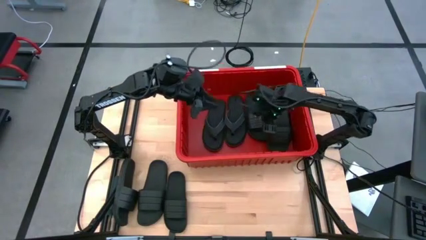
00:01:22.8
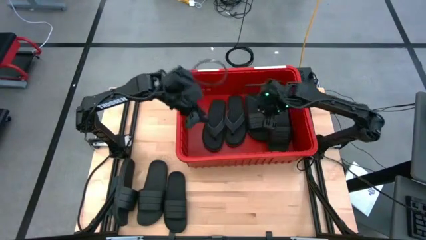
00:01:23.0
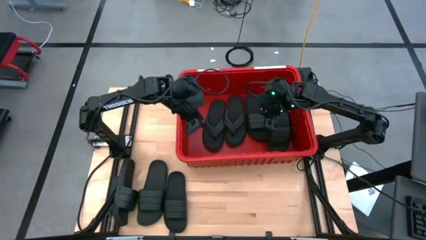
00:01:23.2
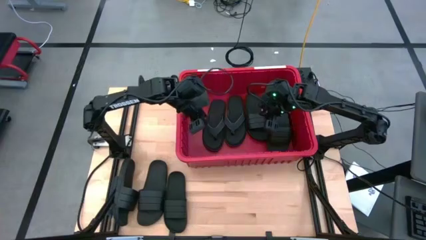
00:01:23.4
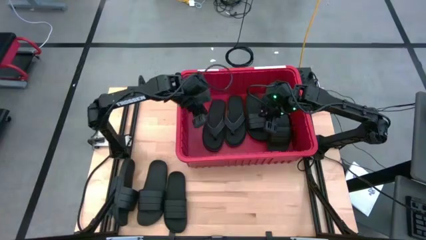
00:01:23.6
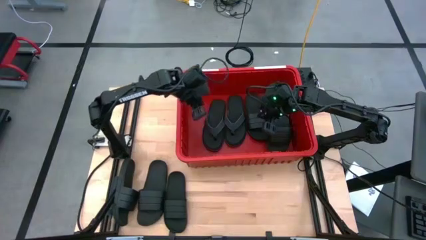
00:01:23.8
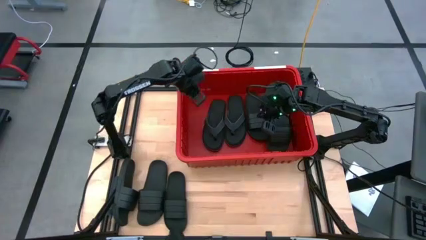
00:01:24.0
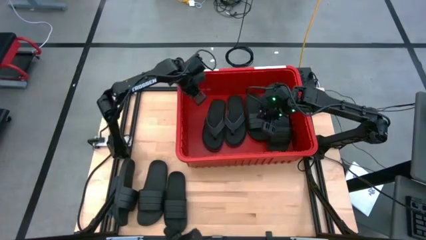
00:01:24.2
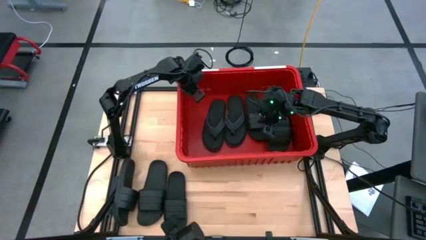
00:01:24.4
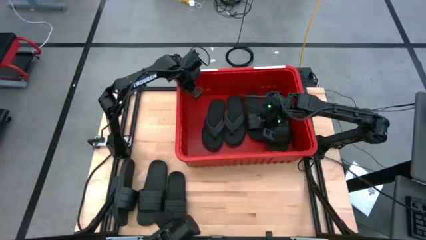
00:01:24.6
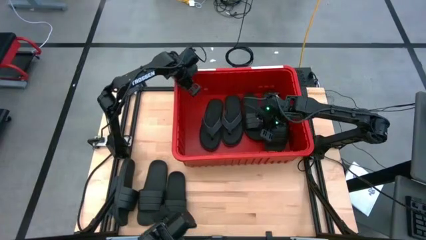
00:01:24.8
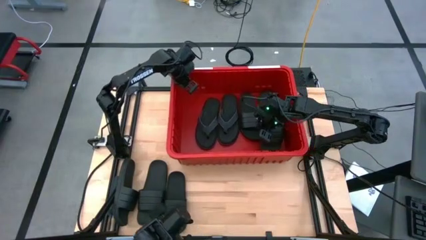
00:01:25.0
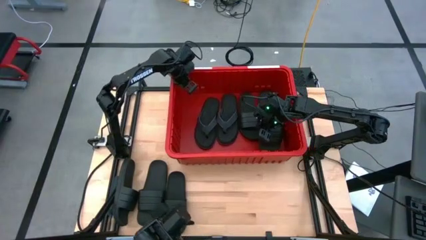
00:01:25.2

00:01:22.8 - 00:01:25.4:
Task: Pick and place slides into bin
Adjust the red bin

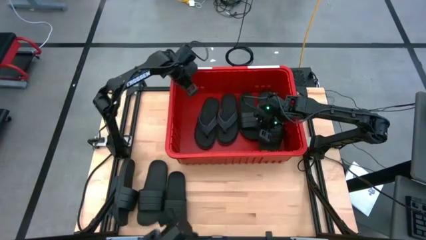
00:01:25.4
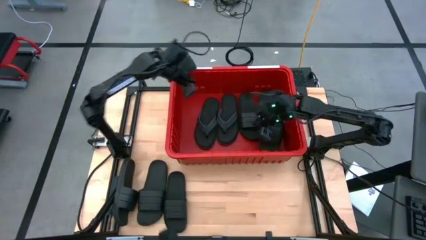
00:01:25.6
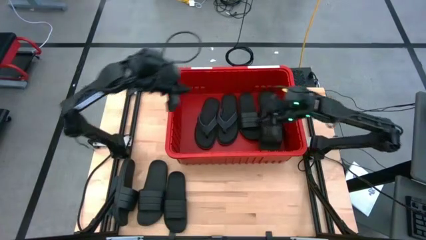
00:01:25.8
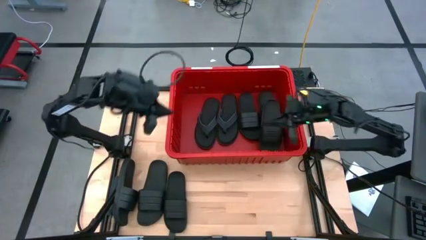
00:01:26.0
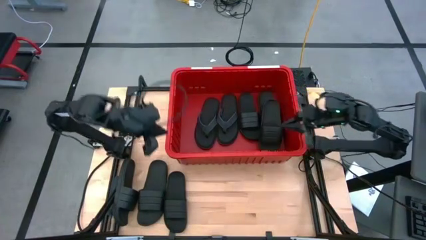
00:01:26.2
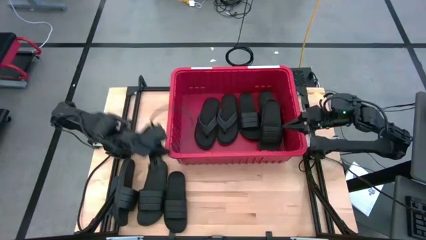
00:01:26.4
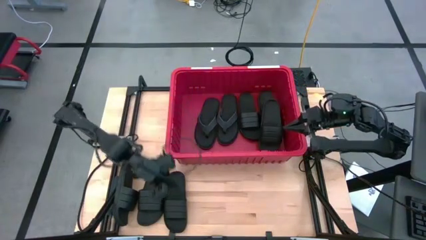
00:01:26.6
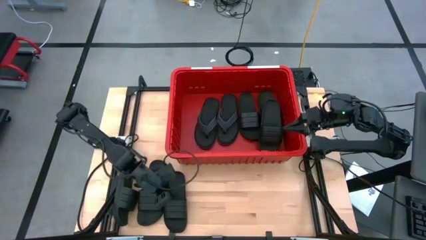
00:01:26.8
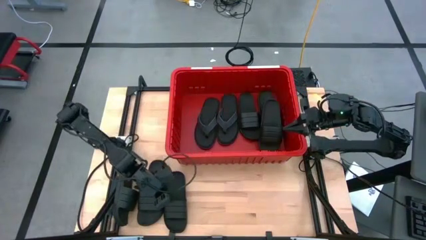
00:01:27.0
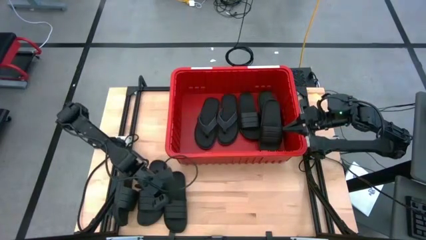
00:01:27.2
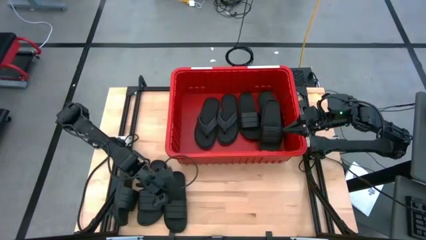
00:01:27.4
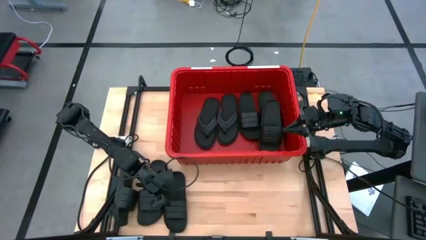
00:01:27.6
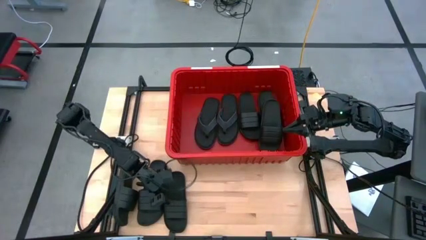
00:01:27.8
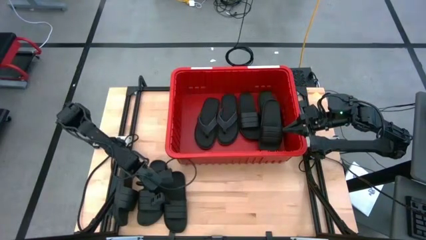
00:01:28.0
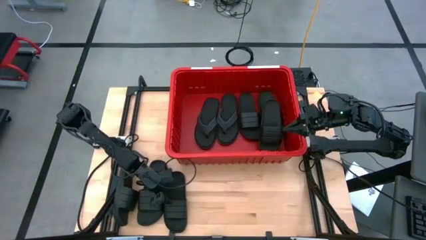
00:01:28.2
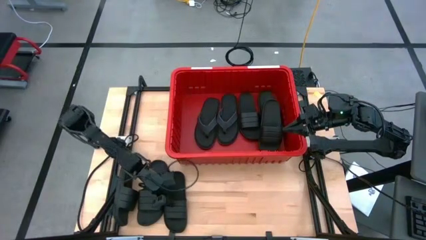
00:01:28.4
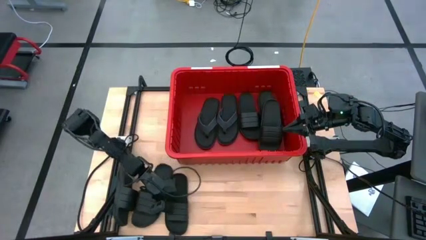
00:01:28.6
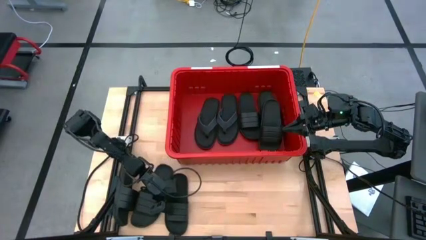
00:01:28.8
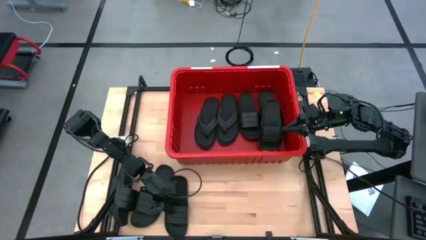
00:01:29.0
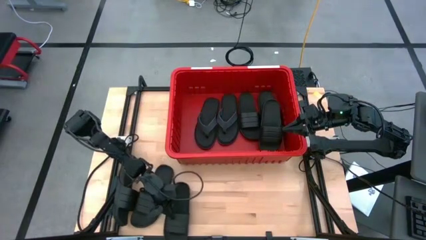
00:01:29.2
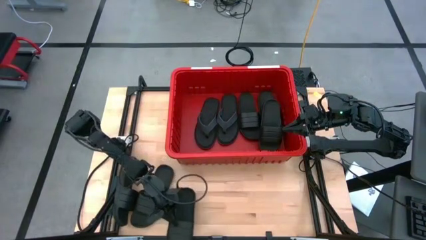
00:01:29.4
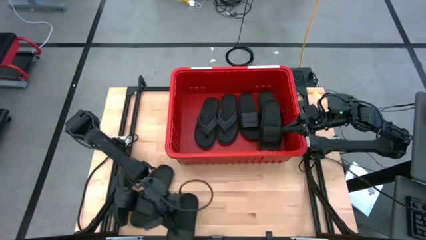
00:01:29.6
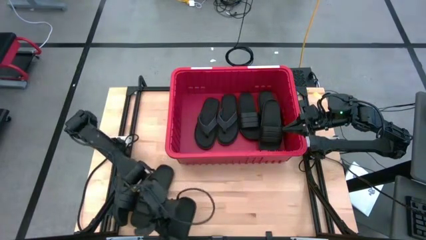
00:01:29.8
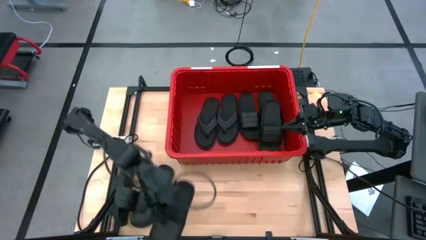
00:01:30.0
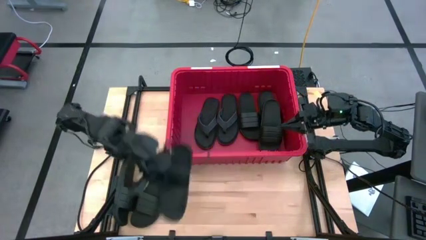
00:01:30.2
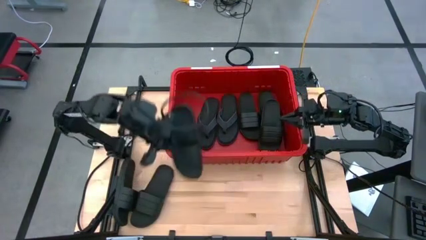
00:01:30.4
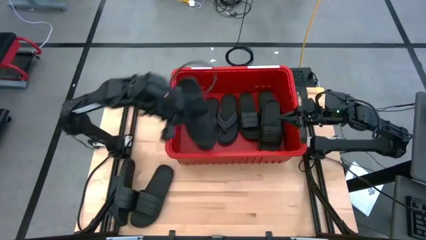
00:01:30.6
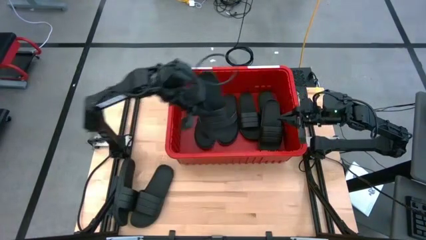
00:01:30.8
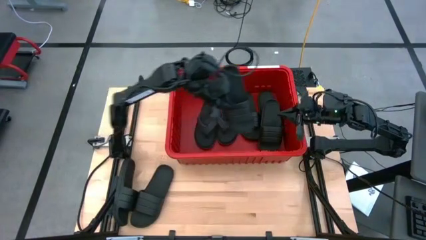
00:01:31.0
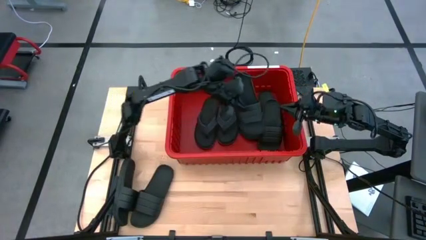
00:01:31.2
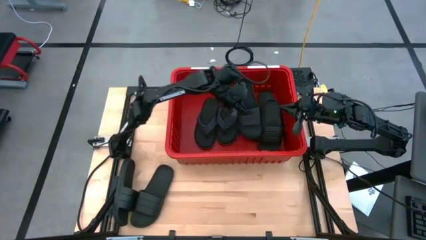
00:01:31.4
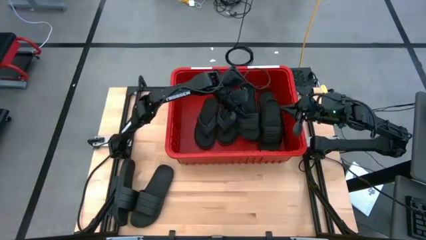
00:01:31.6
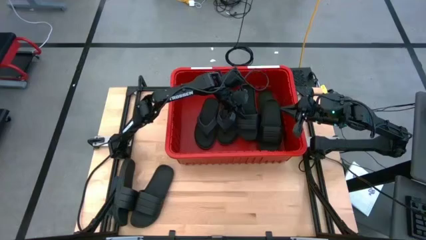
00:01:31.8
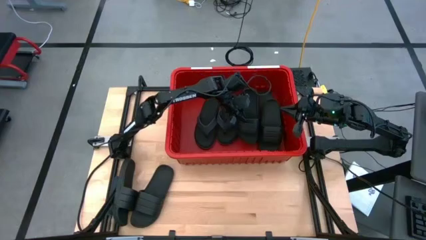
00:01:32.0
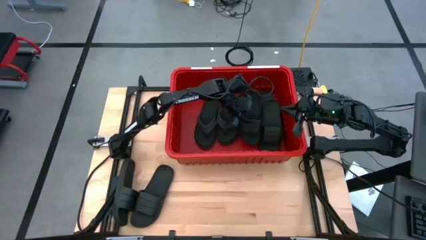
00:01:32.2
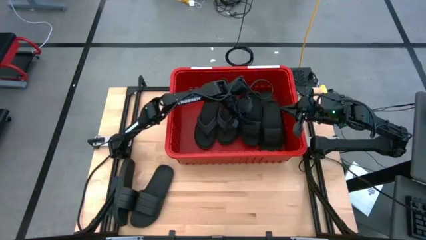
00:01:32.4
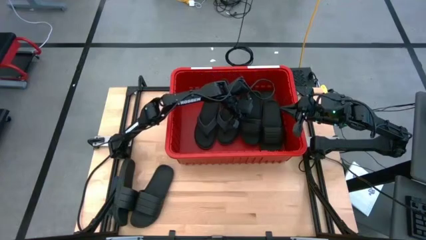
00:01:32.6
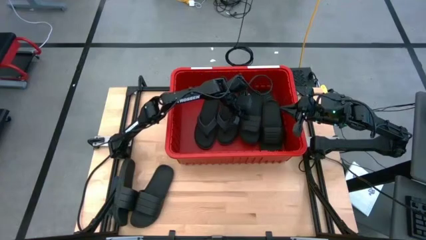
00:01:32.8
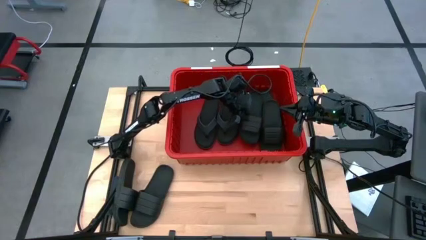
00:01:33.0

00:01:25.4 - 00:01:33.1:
Put the right black slide into the red bin

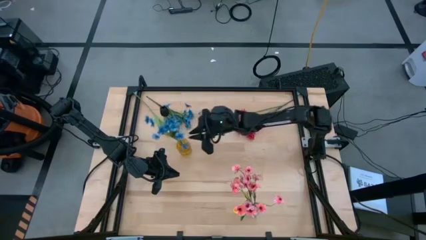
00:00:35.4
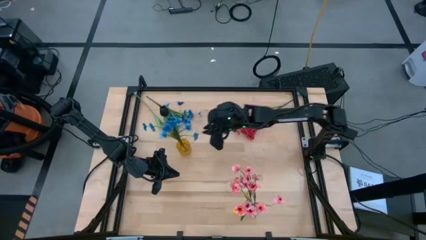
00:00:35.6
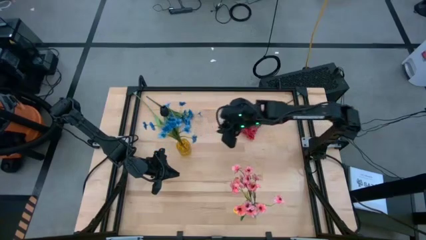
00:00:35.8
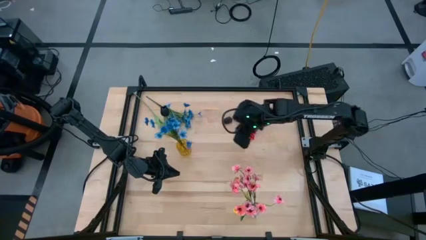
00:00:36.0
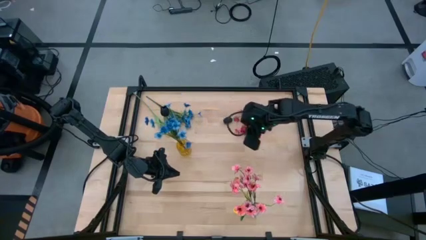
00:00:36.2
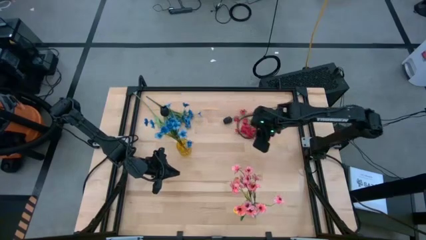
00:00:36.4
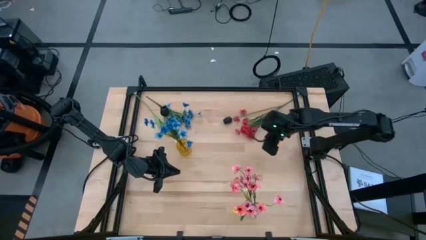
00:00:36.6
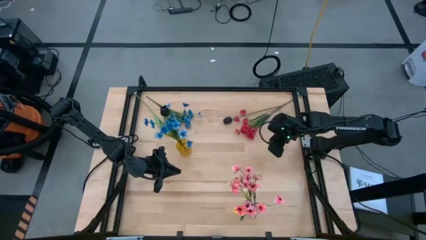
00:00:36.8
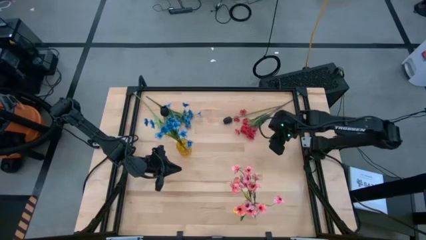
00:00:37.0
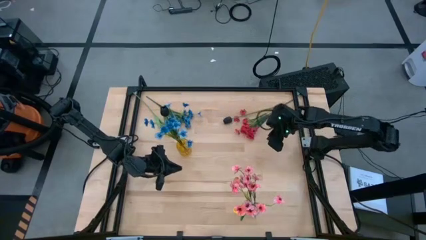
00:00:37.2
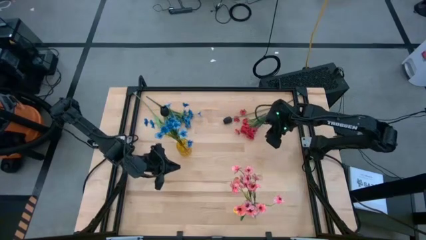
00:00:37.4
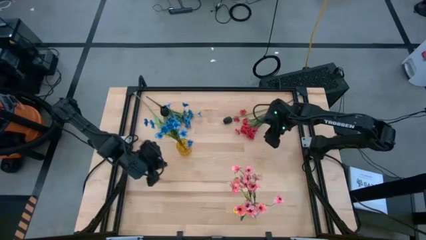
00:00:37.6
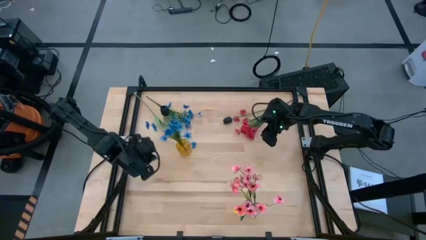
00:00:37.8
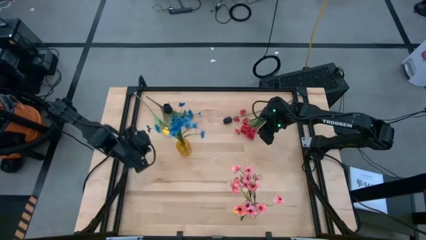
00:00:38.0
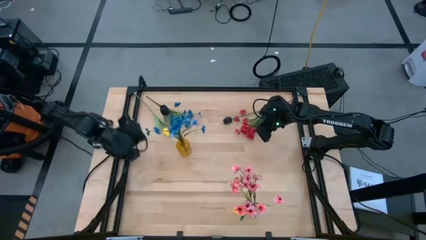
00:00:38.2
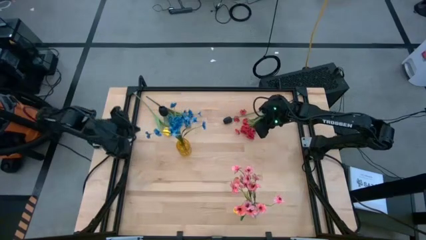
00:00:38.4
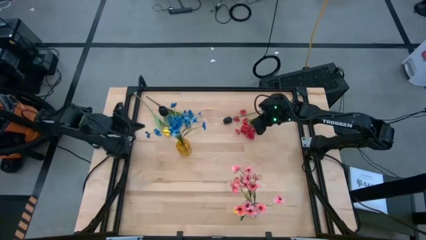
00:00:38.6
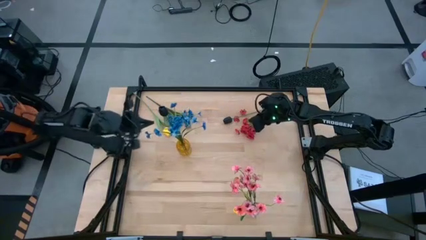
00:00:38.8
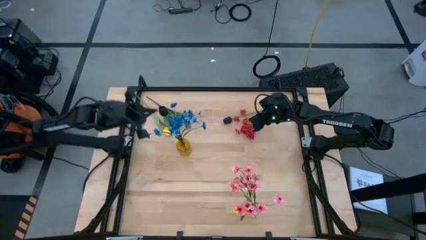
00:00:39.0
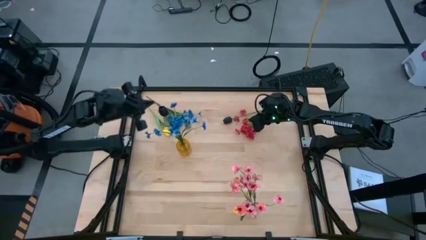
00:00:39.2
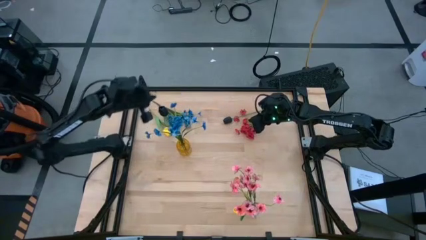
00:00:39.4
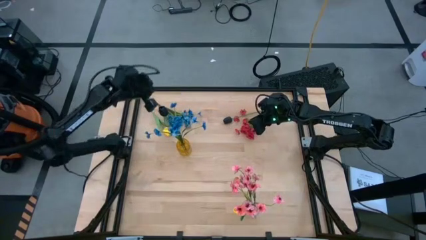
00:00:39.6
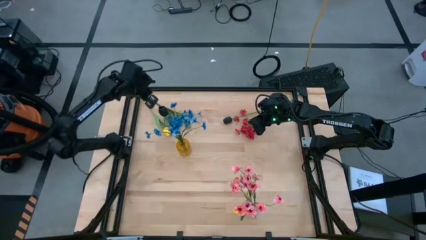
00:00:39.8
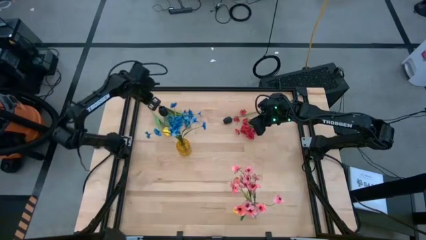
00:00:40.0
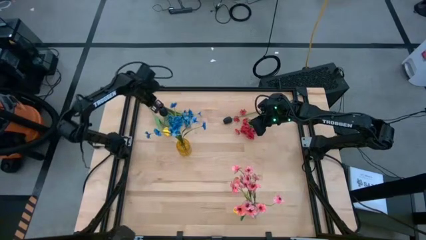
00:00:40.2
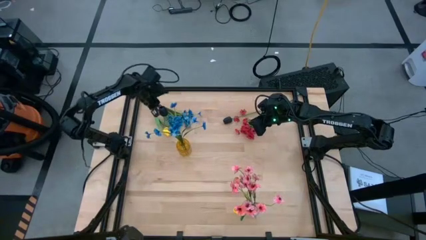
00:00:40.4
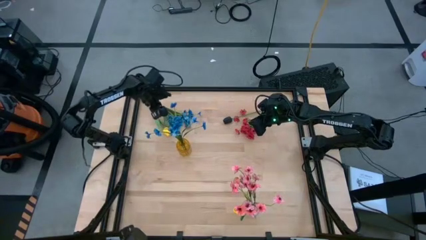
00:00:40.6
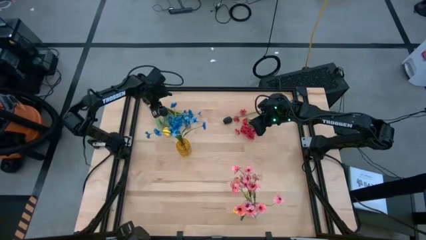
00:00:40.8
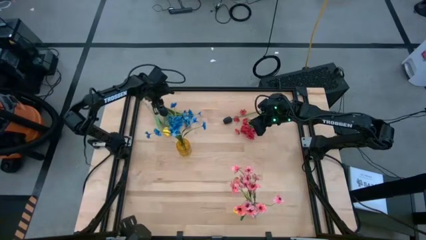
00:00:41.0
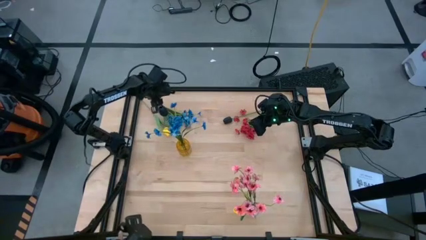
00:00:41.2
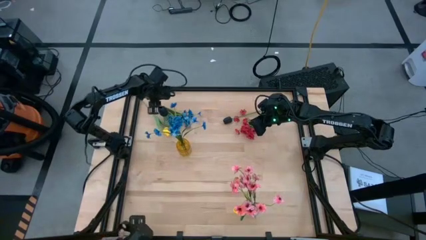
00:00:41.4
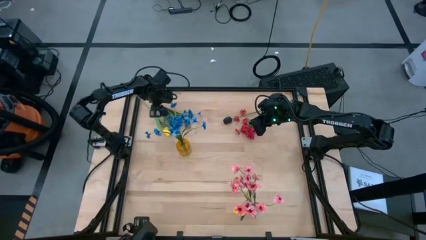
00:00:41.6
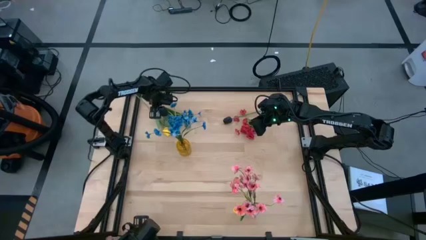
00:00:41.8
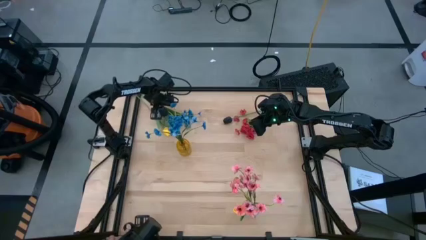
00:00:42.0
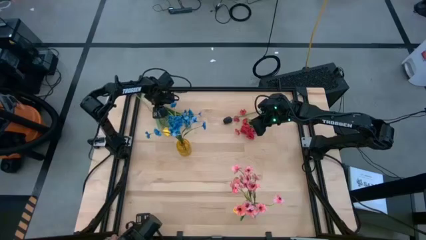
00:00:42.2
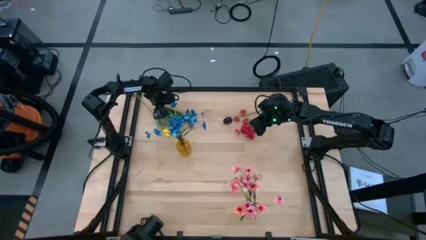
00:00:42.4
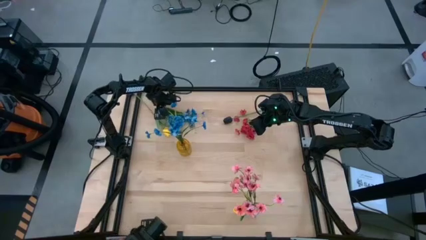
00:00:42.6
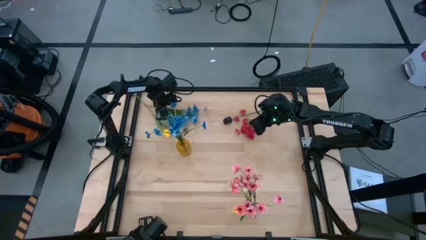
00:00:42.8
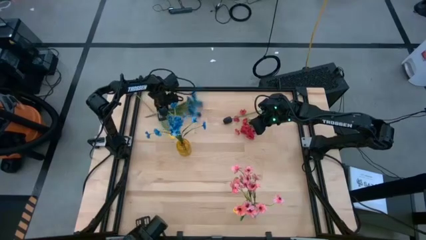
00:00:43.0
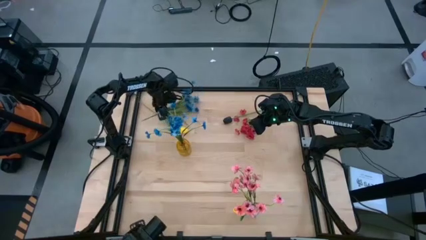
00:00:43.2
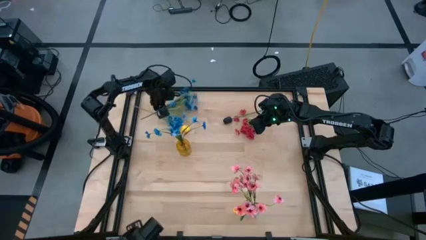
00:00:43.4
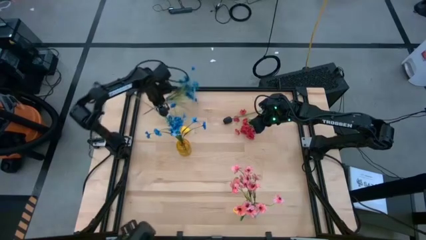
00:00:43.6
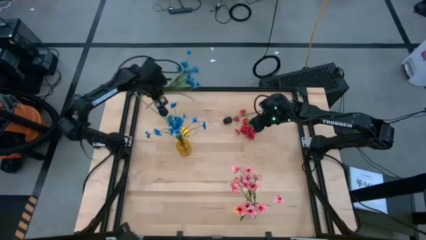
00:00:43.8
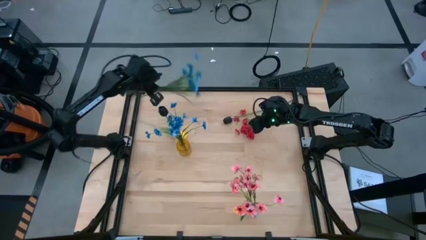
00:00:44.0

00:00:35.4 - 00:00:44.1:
Task: Sort flowers into vase by color
Put the blue flowers into the yellow vase
